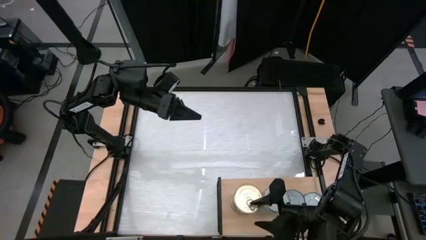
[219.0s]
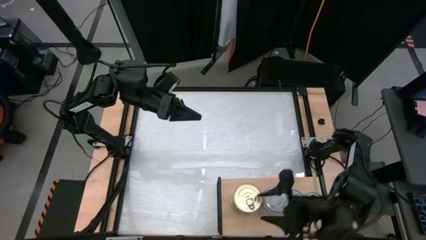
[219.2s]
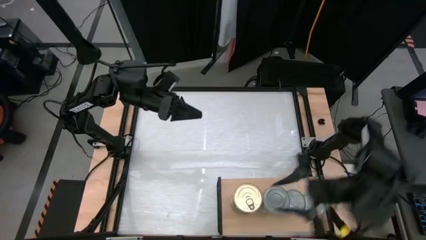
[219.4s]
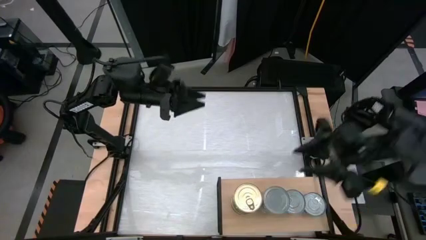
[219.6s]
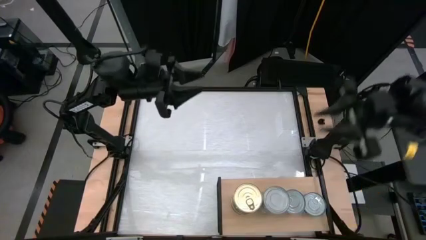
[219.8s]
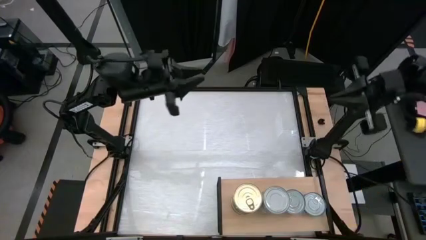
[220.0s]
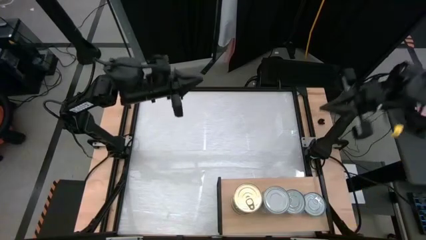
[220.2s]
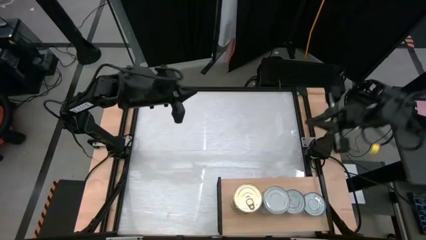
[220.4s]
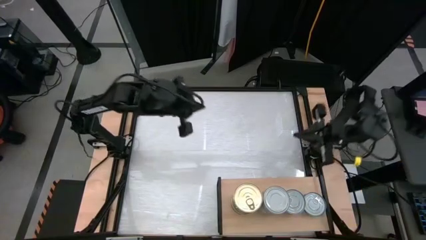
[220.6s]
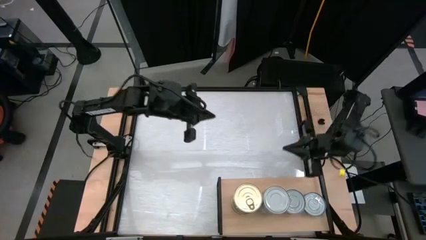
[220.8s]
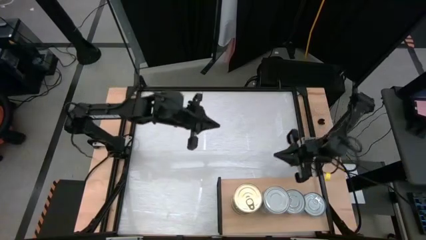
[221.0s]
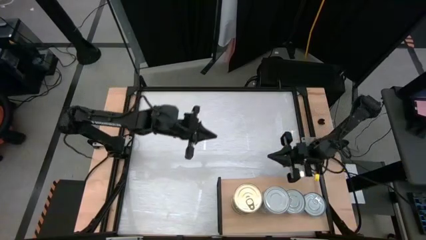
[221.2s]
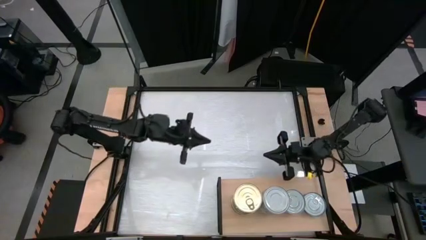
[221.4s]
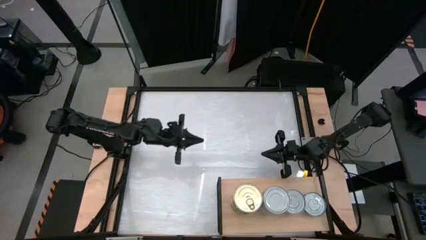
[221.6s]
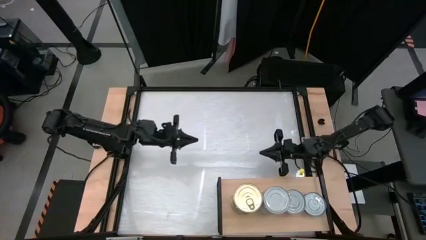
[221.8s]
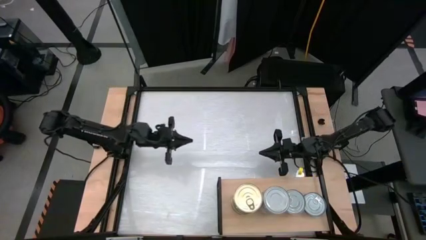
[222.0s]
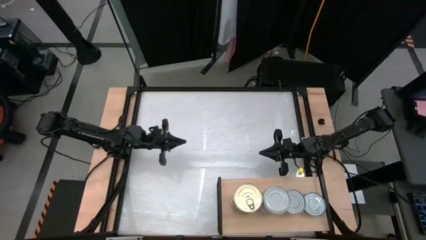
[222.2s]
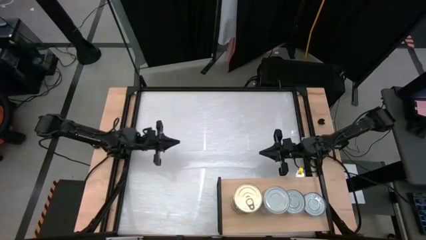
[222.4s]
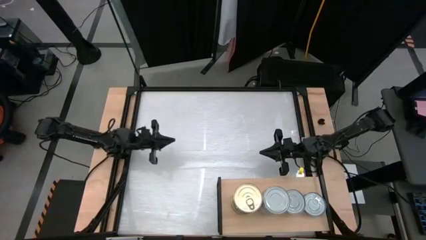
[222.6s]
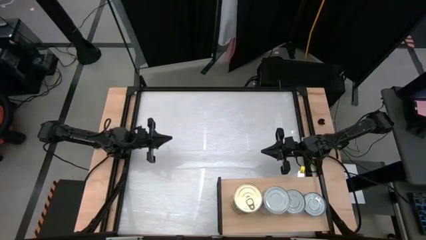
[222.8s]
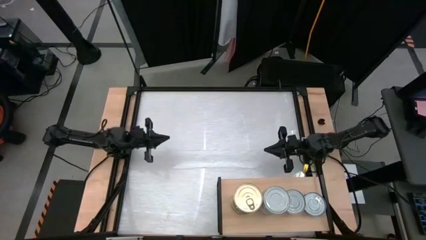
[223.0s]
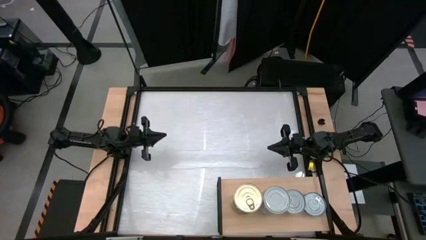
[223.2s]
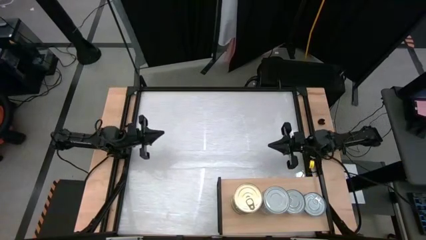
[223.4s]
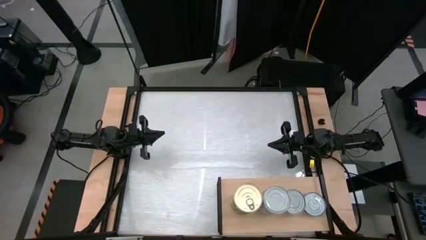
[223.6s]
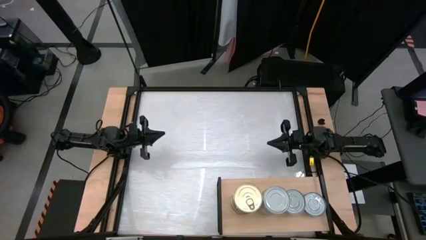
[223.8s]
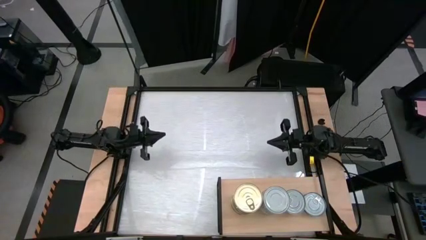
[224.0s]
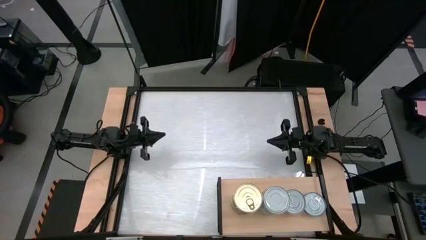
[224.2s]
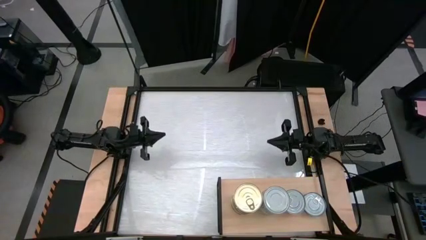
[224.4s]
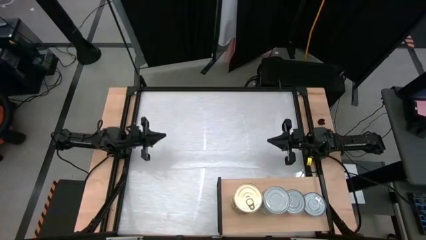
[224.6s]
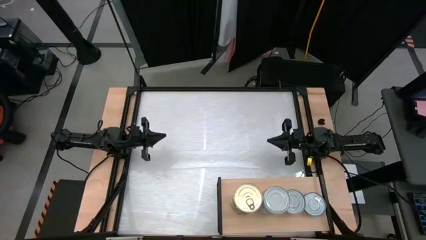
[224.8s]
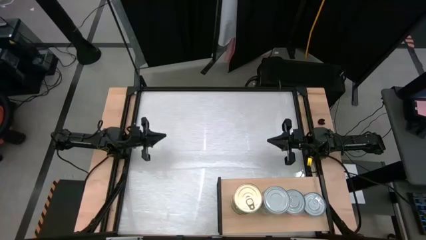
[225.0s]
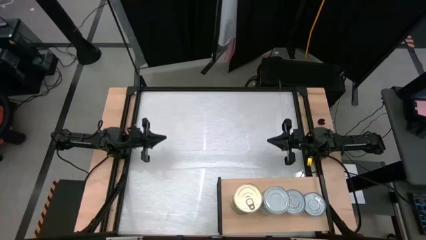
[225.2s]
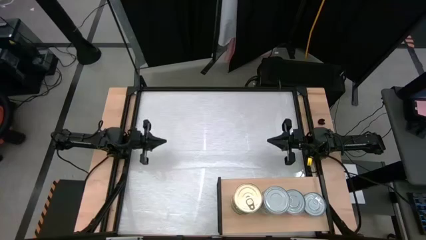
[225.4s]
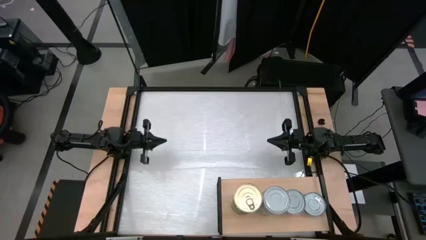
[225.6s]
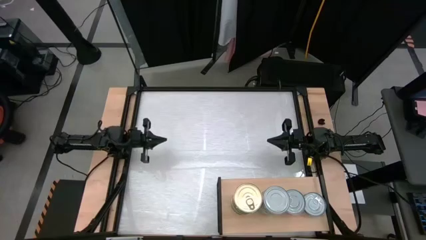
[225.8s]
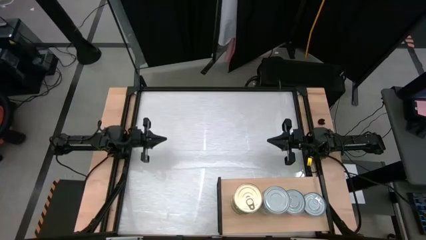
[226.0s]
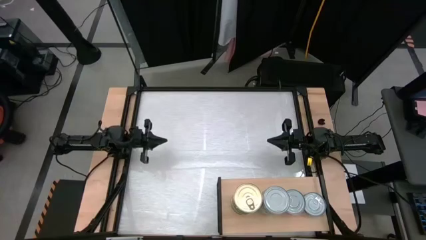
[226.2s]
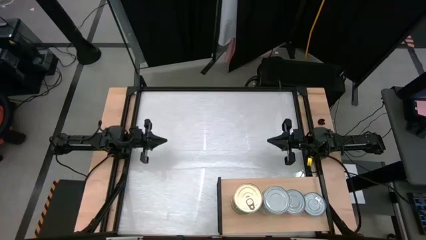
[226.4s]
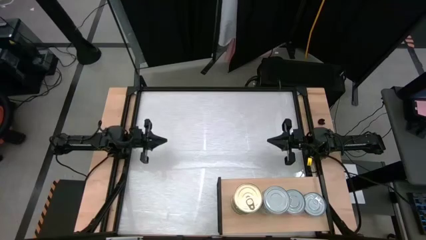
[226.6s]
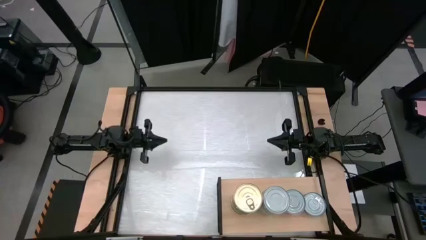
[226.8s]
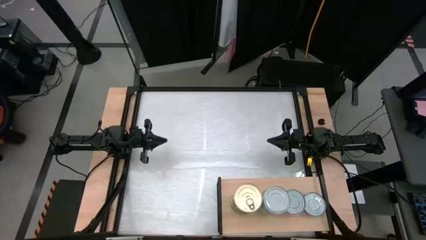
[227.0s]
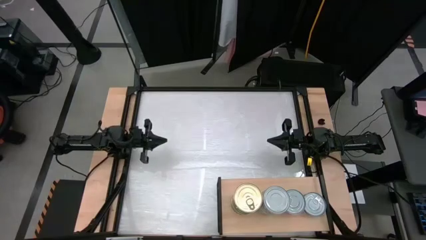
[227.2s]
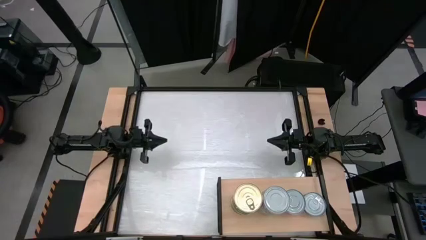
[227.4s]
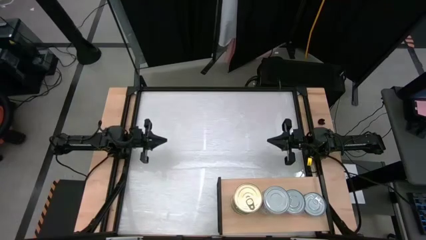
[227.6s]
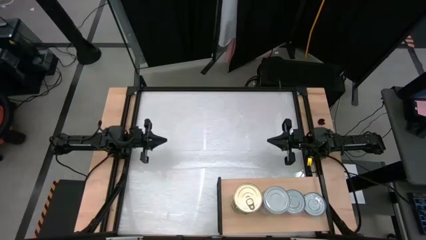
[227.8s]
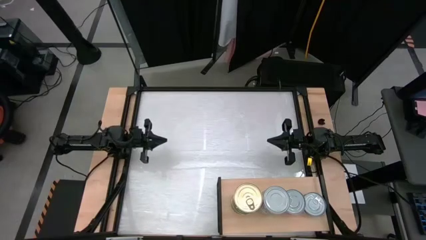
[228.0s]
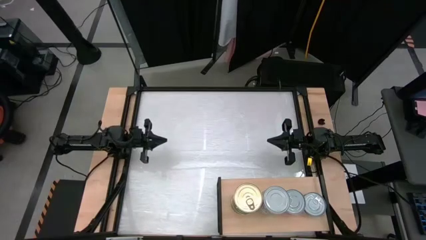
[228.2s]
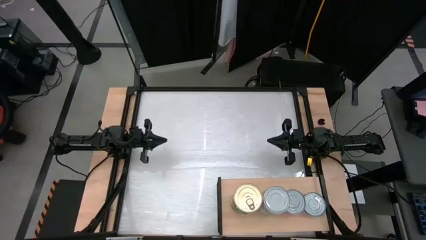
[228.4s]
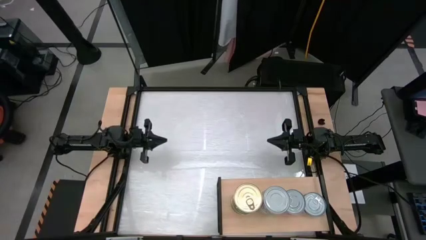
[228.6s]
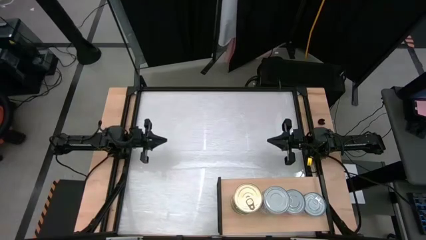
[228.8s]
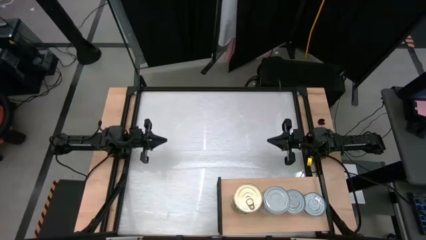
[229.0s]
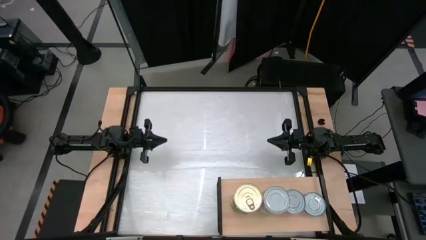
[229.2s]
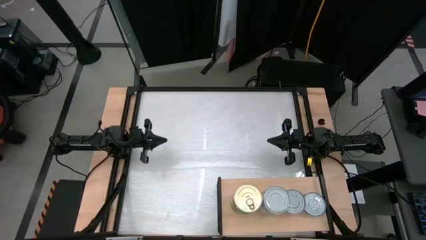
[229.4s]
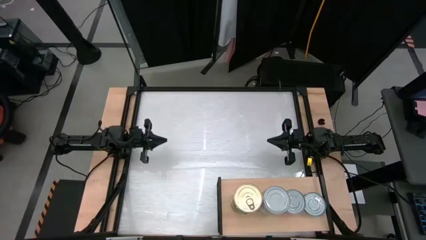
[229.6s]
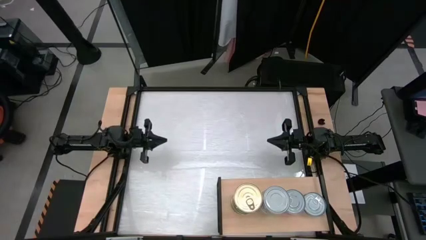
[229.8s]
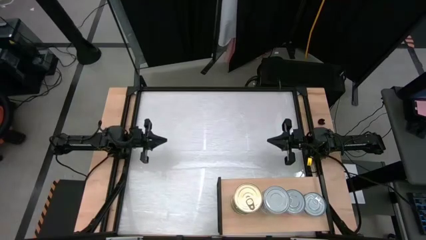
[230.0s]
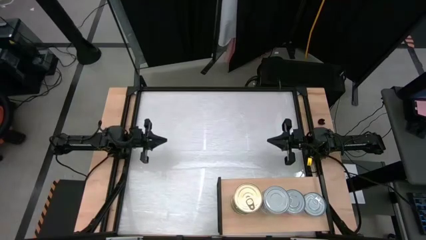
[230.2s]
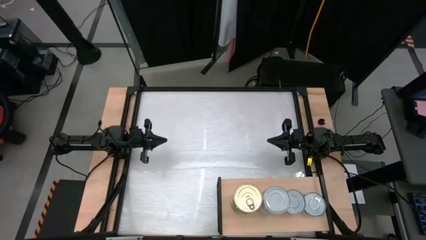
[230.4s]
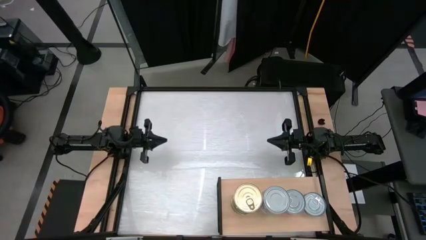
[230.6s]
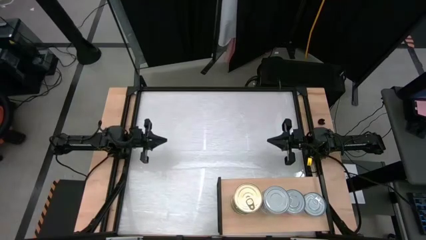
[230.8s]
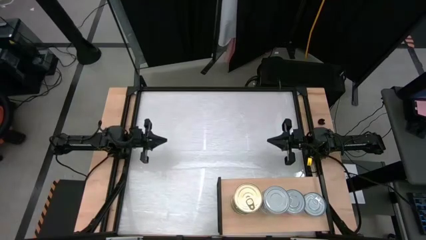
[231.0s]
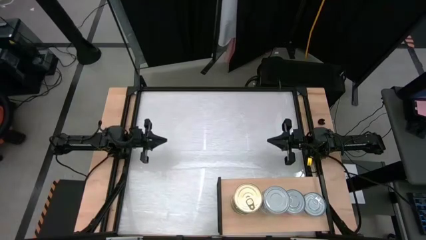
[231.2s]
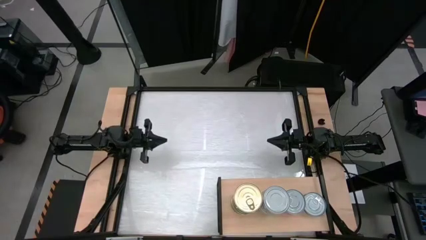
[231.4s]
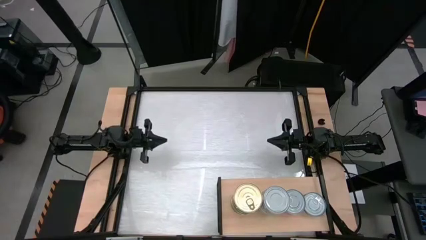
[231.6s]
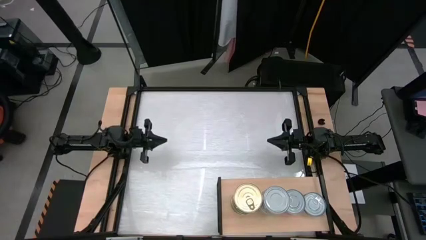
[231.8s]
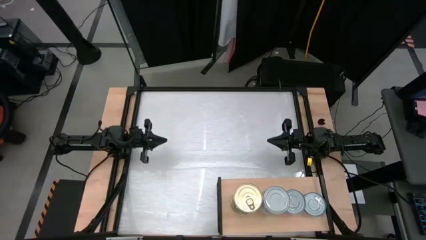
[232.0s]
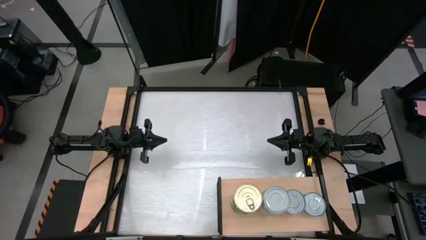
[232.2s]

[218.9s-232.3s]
Task: Stack canned seafood by type on shelf
Return to Home Position

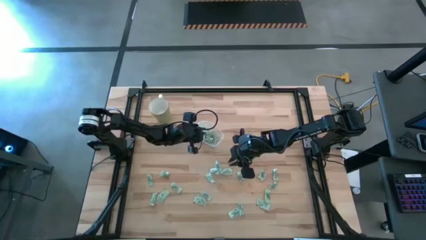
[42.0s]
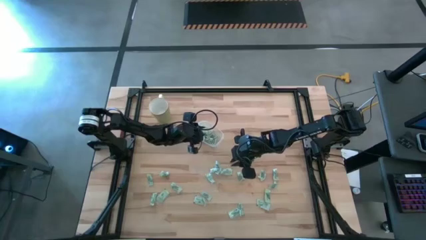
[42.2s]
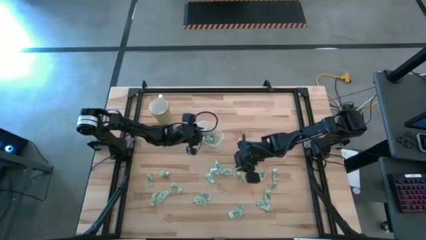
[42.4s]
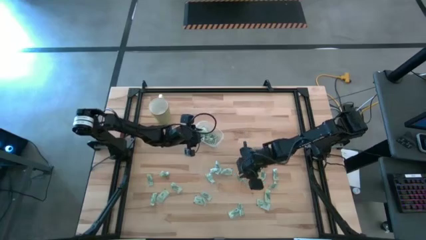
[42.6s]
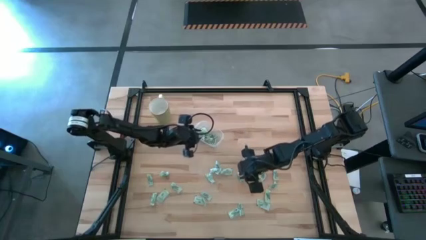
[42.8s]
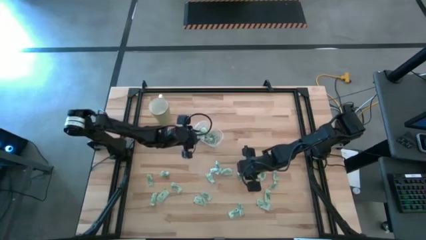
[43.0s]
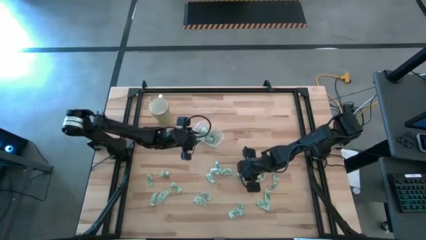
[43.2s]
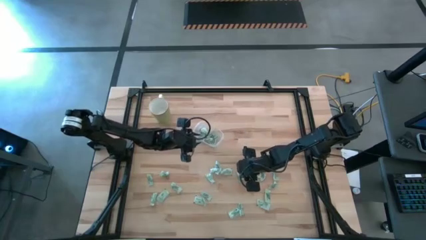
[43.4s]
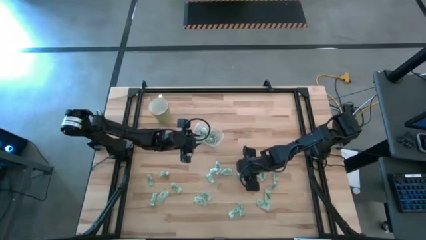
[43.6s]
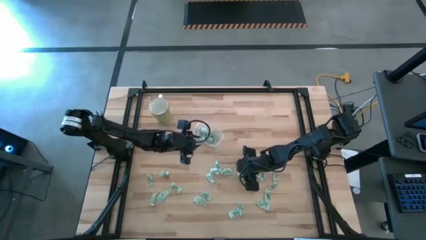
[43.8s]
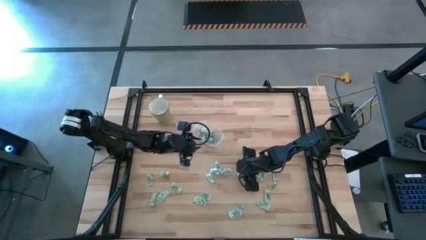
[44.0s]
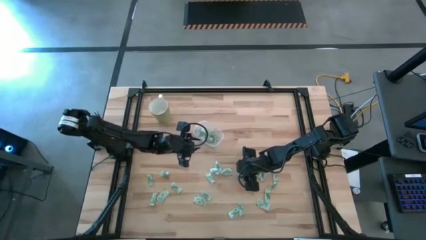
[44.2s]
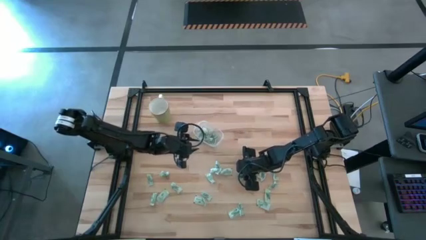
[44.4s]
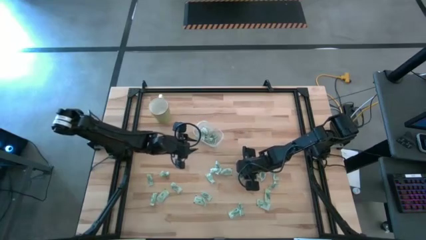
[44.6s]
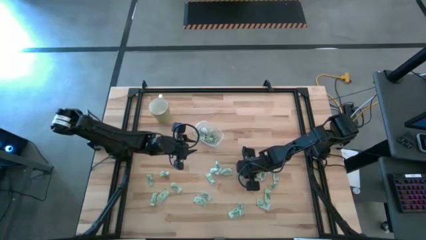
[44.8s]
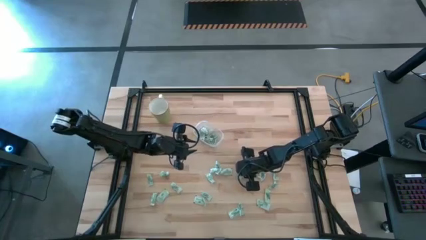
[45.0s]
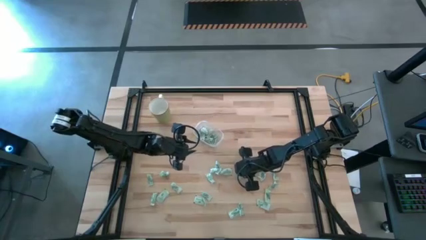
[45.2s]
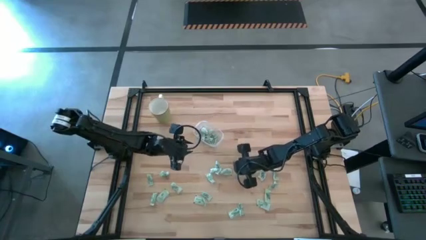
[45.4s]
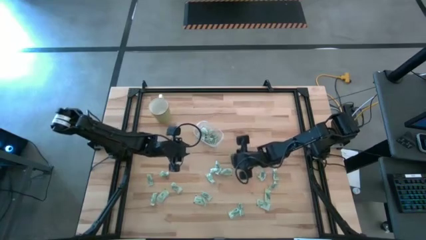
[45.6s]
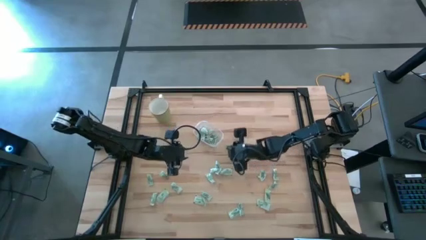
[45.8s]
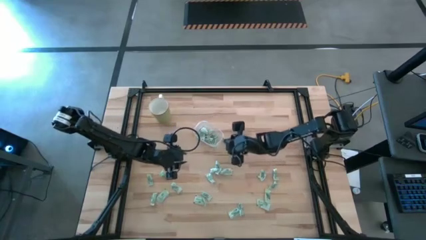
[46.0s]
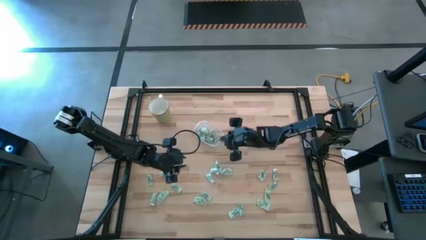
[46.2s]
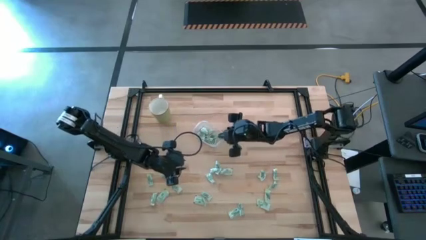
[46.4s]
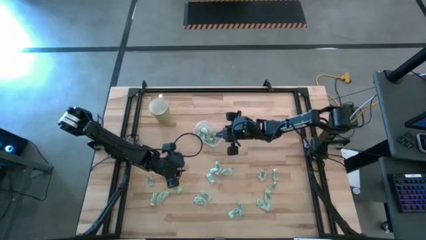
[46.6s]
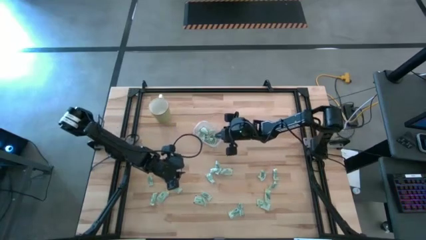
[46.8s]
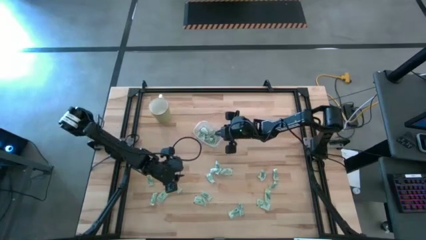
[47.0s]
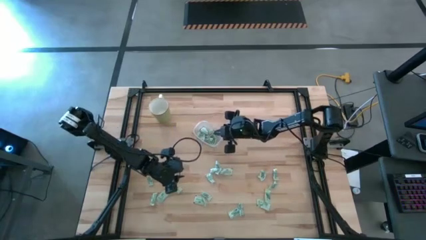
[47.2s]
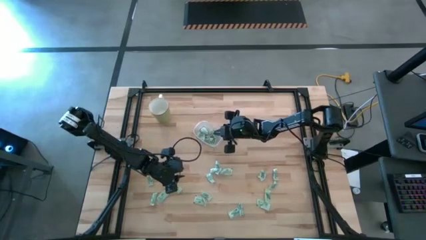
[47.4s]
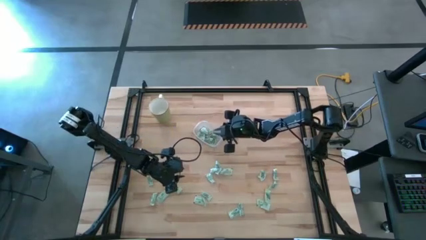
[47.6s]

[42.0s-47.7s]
Task: Pick and place Stevia / Truvia into bins
Put the stevia packet into the transparent container
